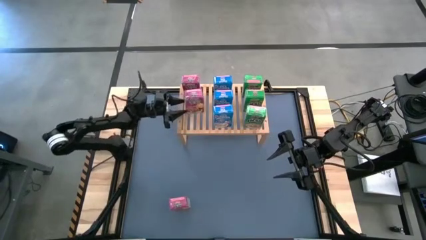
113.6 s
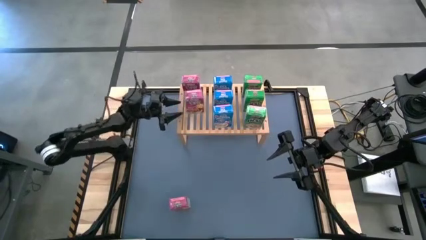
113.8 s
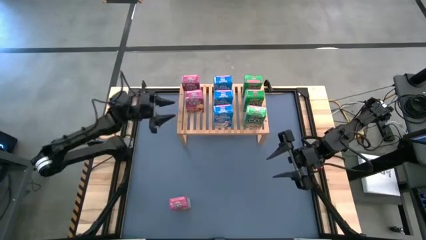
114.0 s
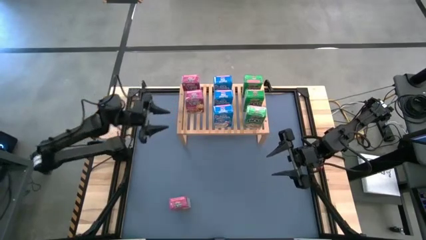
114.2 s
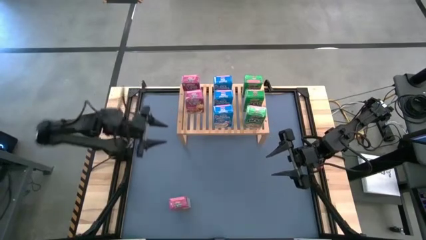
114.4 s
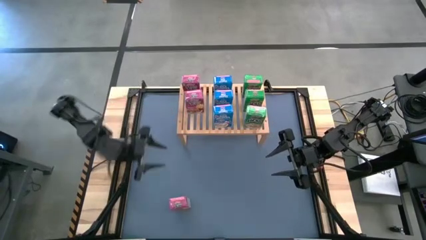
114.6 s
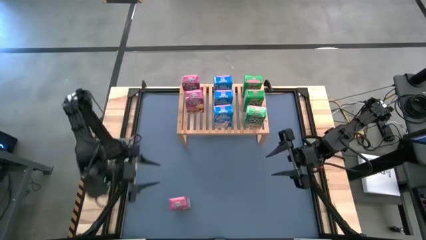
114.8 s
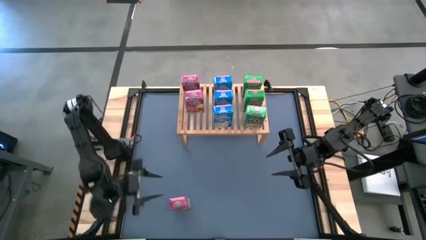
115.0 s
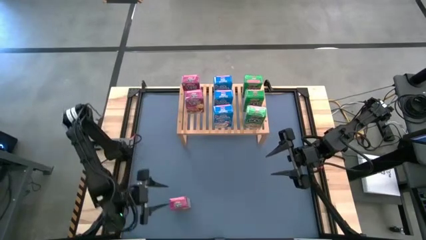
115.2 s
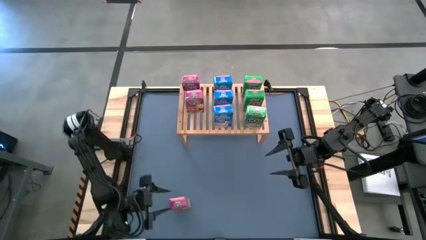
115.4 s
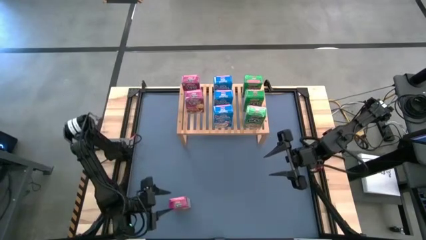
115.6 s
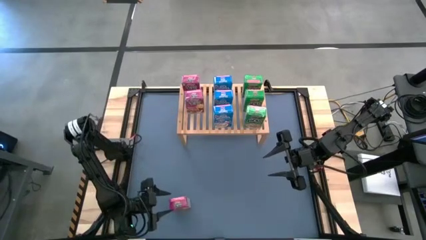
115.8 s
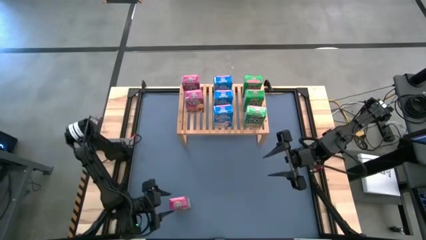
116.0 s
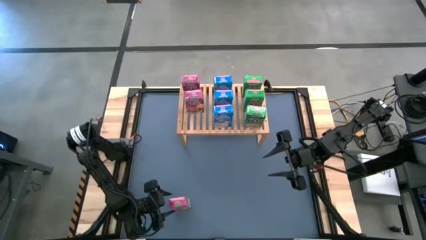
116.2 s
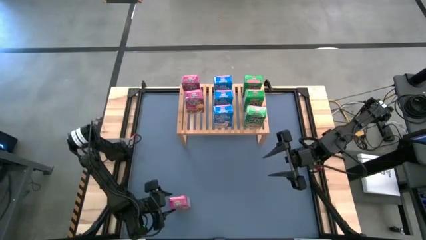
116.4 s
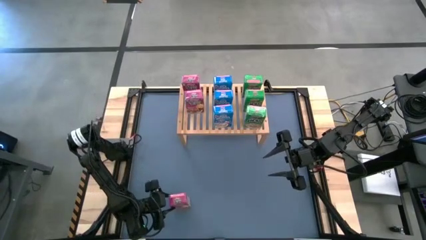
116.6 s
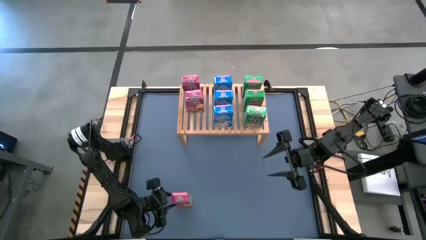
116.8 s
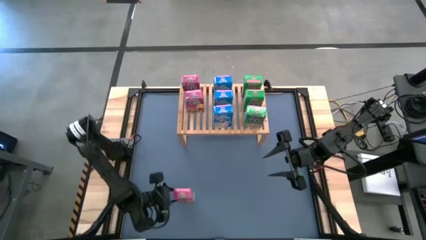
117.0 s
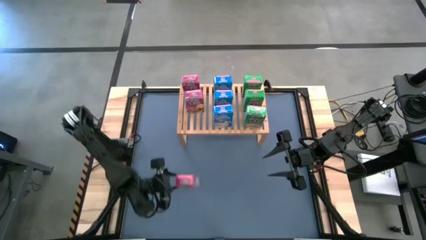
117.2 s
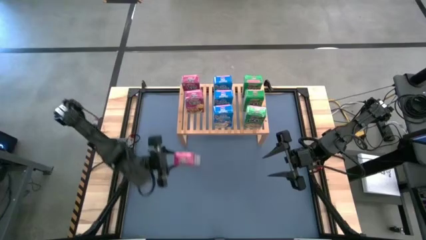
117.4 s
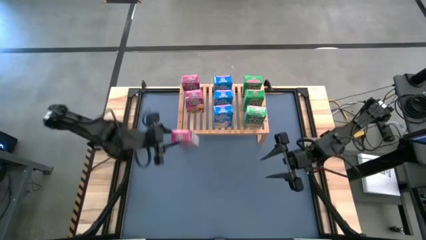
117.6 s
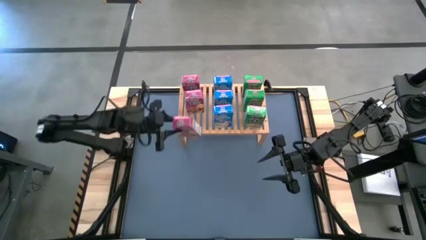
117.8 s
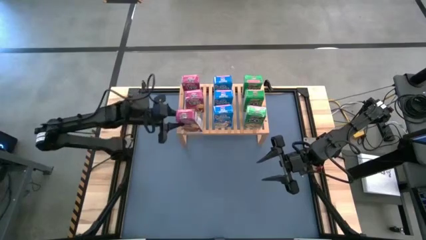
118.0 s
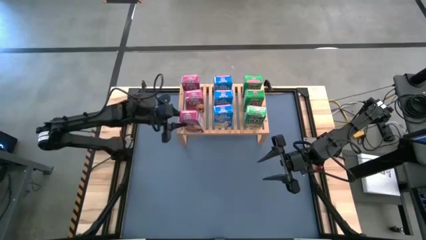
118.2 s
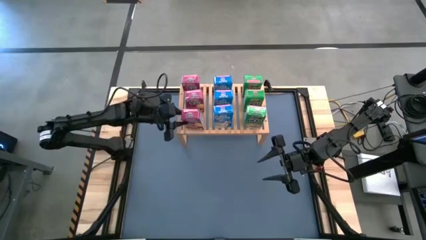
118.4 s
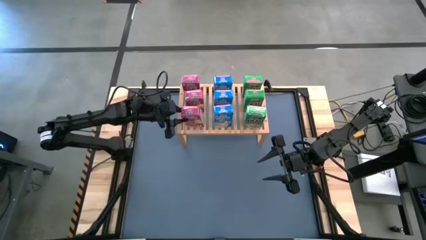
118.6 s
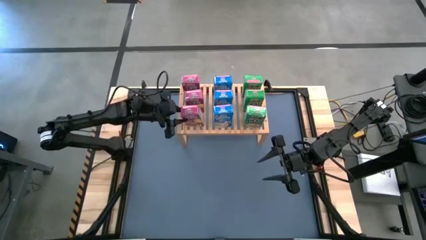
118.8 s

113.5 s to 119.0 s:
Task: Stack cereal on shelf
Put the pink cereal box on the shelf aligned with the other cereal boxes

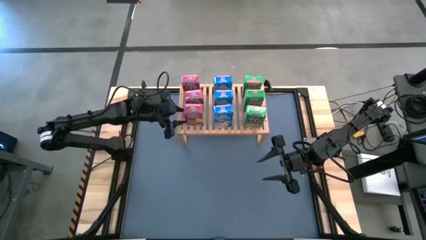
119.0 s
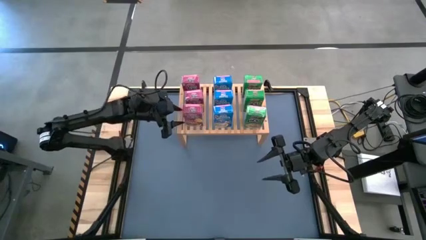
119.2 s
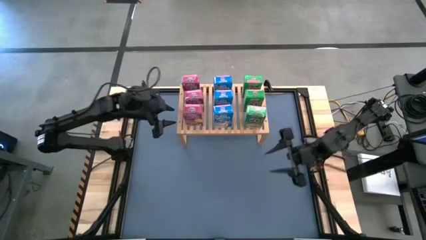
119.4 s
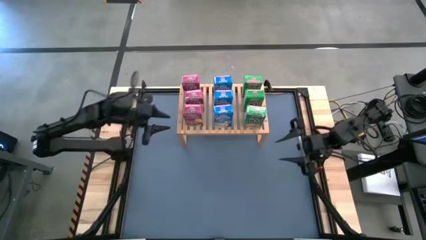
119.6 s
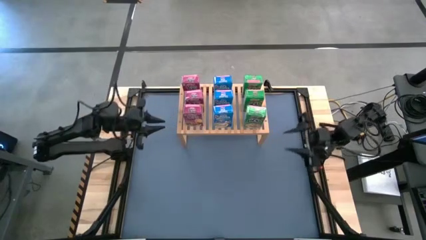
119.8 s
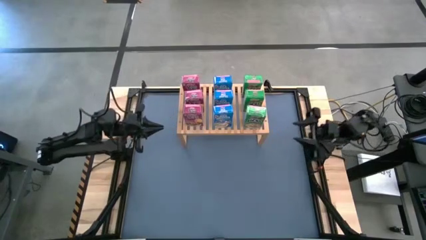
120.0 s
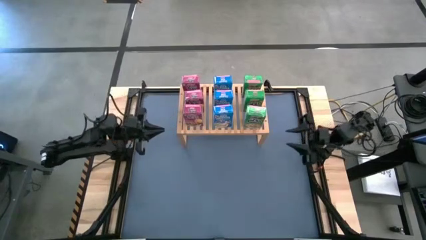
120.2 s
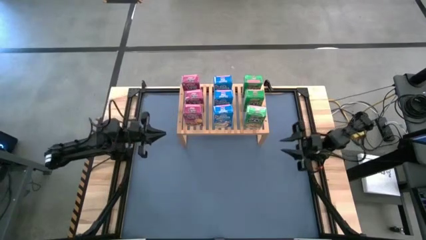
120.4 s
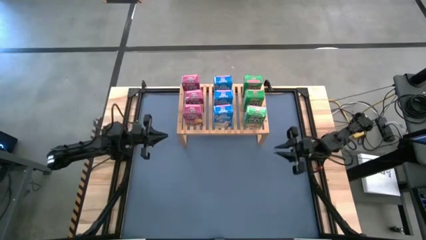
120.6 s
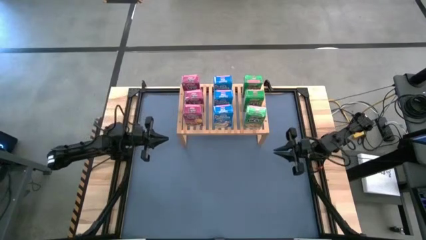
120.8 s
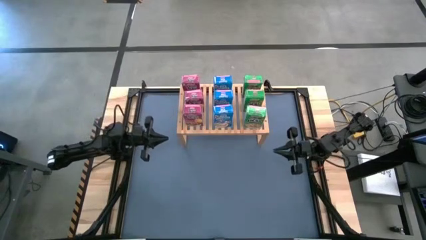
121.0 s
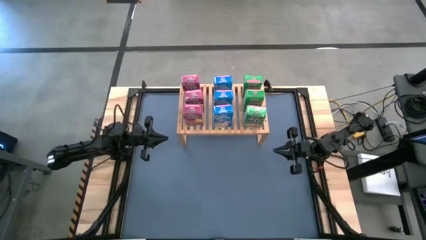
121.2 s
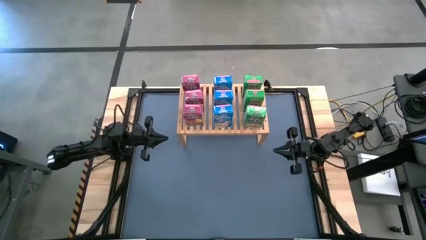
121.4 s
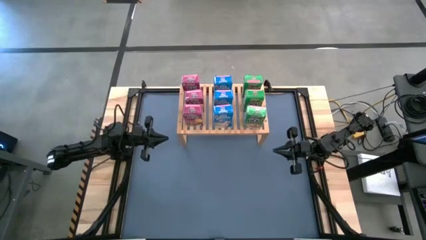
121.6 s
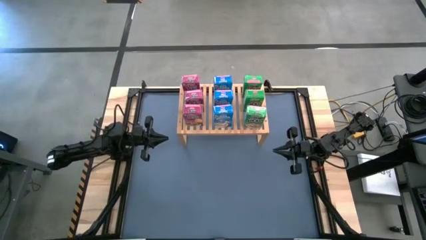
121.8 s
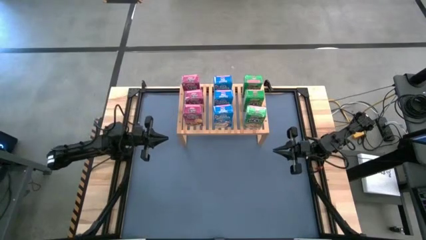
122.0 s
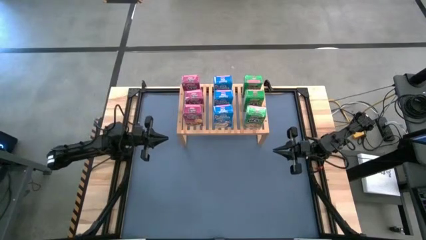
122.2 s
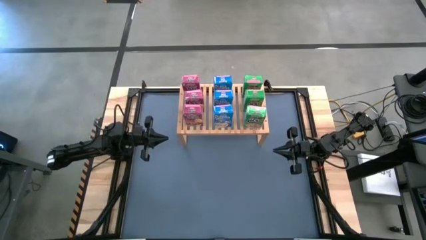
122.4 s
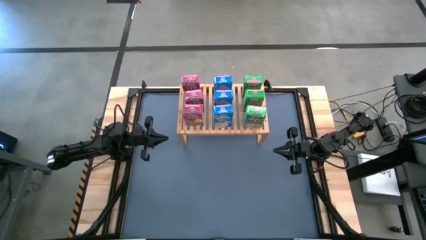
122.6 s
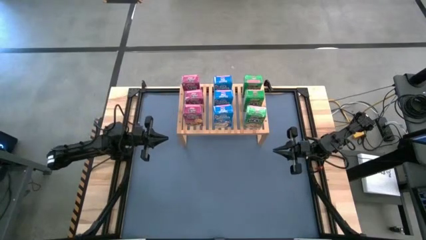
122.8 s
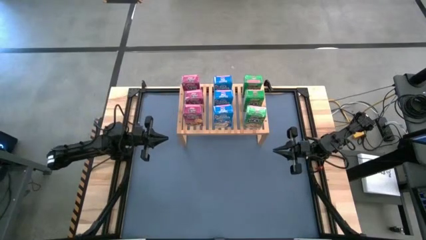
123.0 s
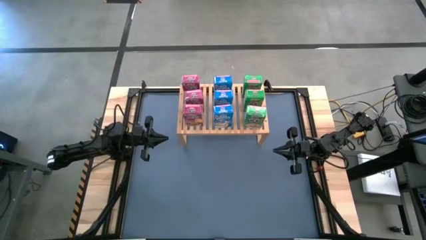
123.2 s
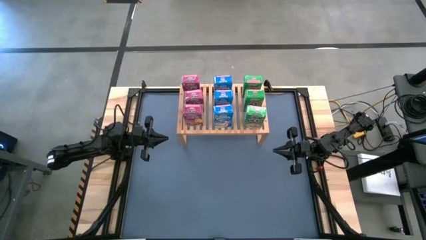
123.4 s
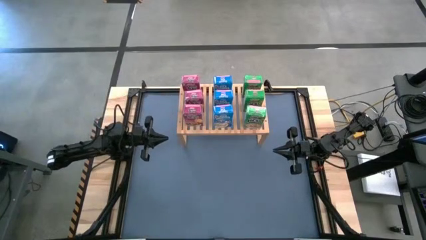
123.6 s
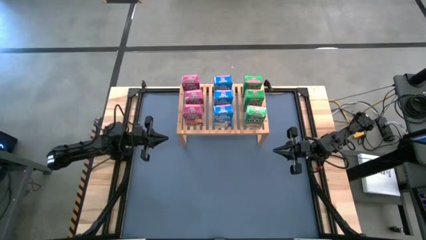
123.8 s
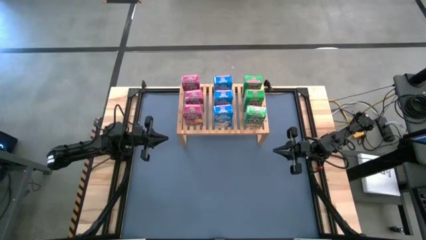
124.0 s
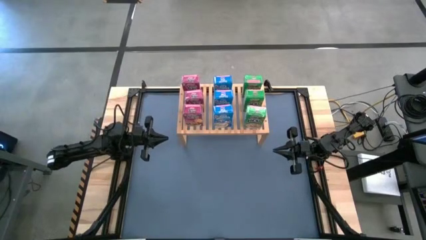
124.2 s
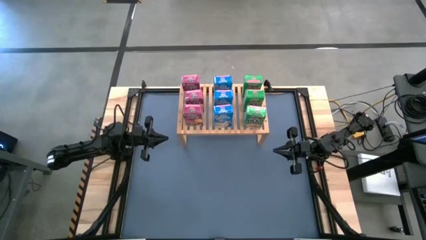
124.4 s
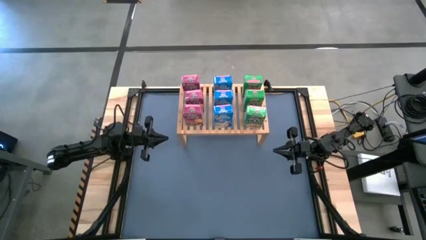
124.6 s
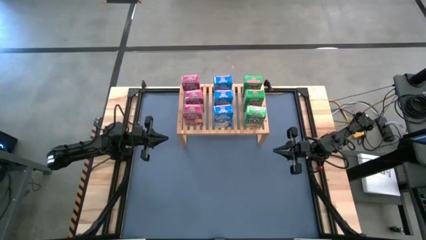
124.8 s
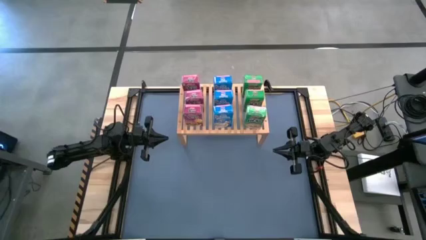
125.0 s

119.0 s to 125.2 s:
Return to Home Position
